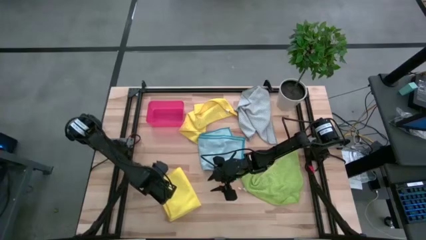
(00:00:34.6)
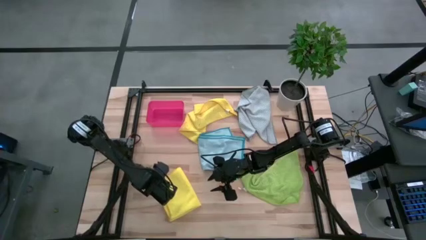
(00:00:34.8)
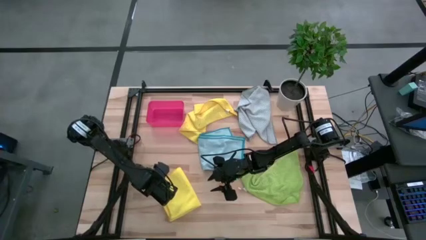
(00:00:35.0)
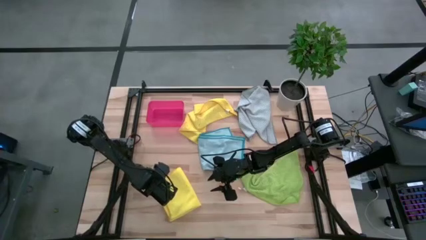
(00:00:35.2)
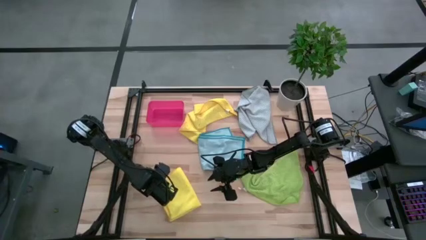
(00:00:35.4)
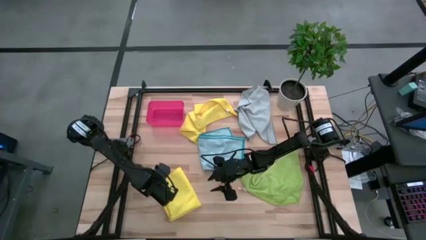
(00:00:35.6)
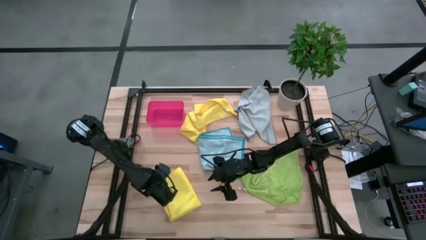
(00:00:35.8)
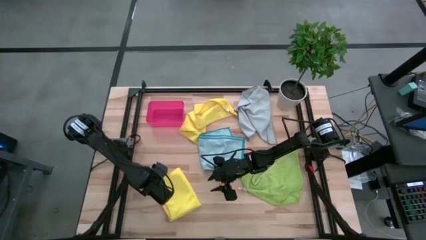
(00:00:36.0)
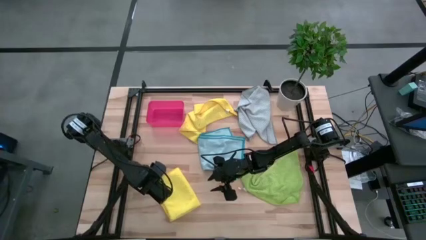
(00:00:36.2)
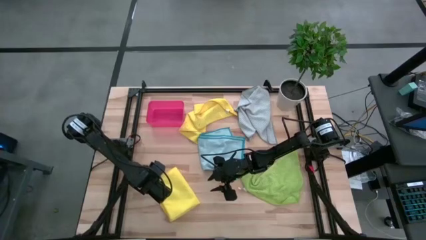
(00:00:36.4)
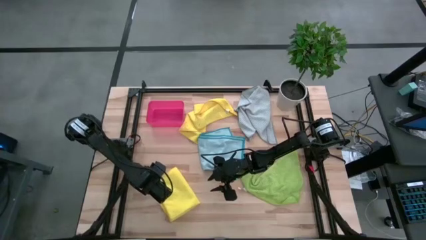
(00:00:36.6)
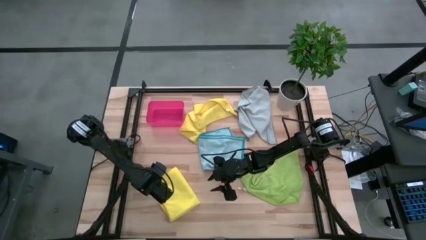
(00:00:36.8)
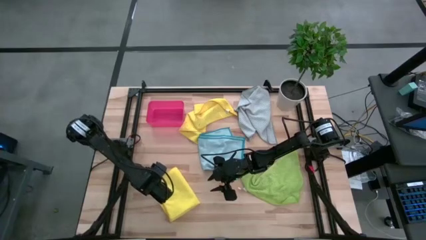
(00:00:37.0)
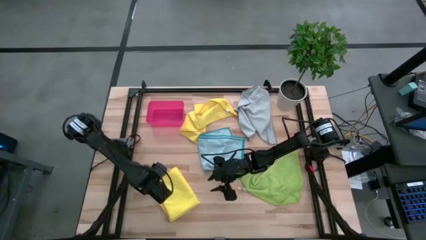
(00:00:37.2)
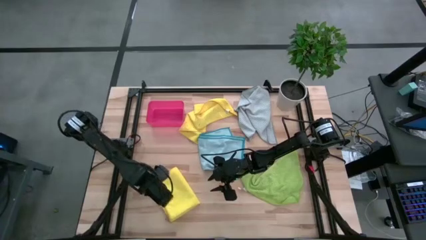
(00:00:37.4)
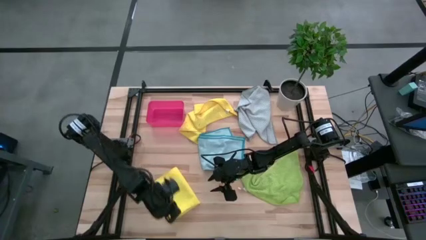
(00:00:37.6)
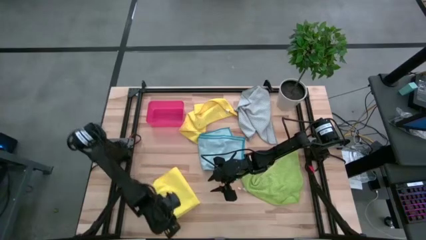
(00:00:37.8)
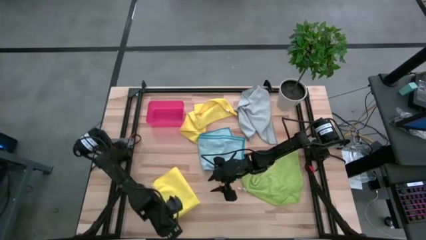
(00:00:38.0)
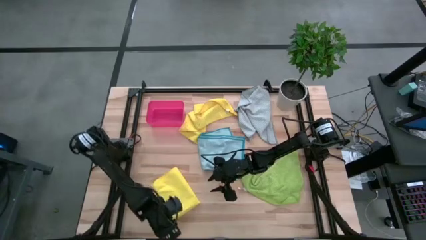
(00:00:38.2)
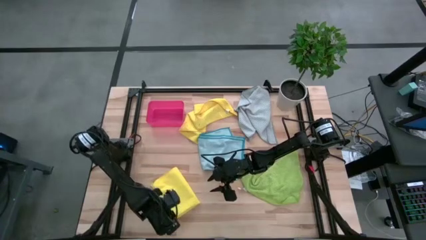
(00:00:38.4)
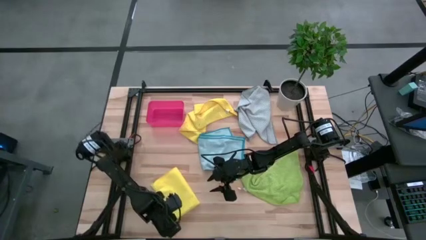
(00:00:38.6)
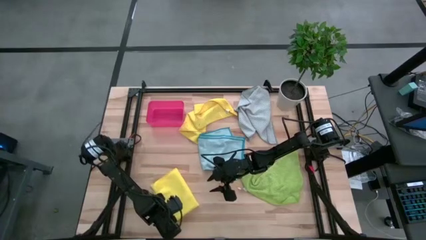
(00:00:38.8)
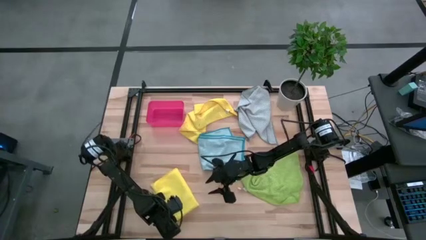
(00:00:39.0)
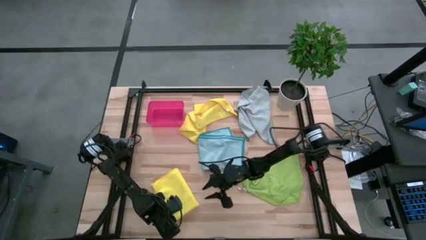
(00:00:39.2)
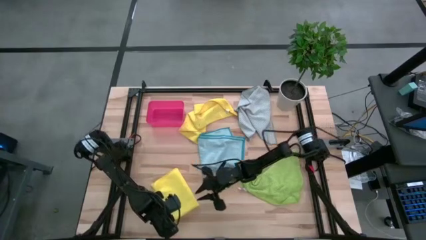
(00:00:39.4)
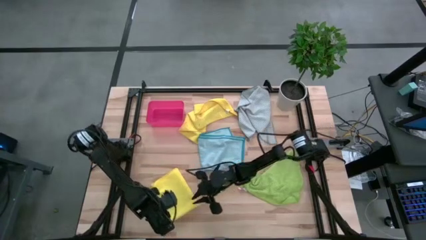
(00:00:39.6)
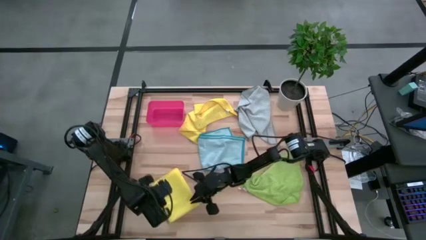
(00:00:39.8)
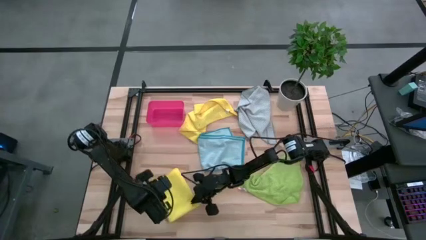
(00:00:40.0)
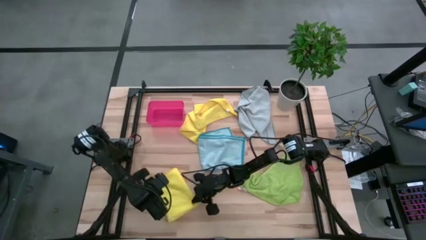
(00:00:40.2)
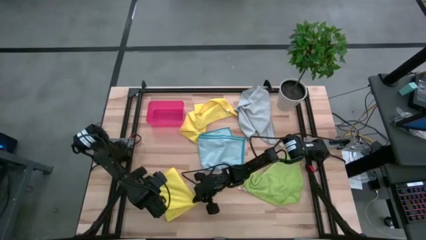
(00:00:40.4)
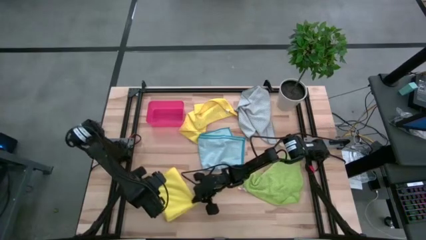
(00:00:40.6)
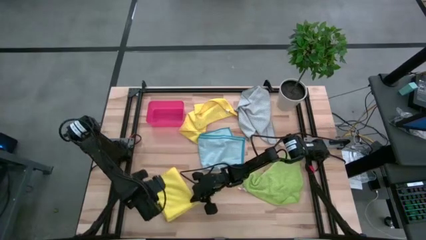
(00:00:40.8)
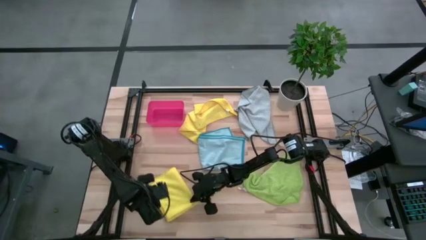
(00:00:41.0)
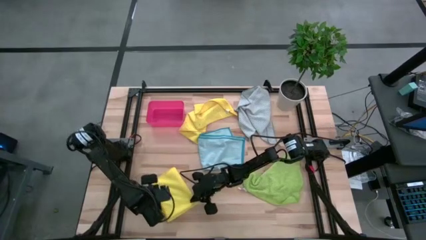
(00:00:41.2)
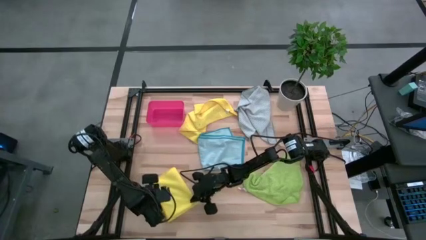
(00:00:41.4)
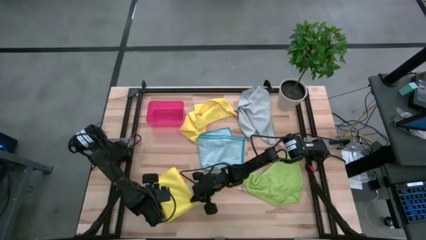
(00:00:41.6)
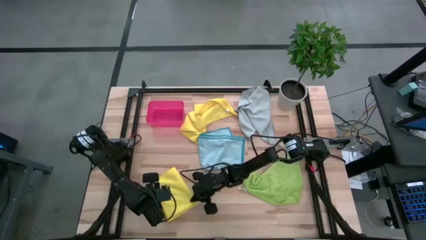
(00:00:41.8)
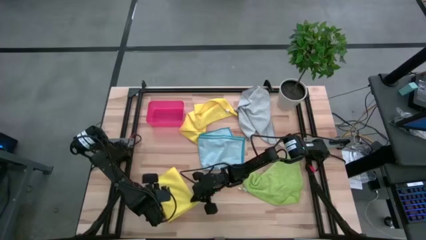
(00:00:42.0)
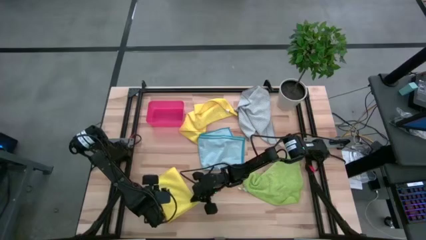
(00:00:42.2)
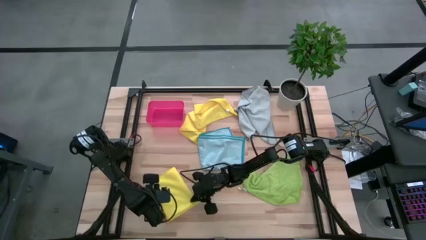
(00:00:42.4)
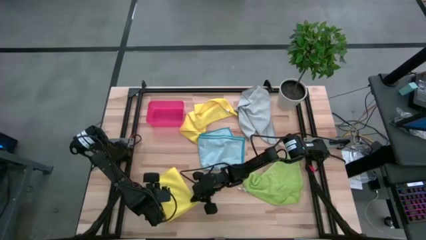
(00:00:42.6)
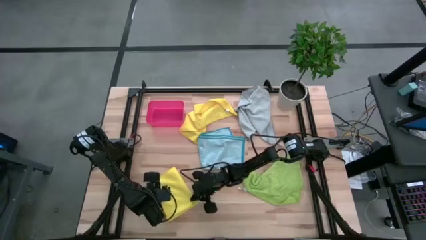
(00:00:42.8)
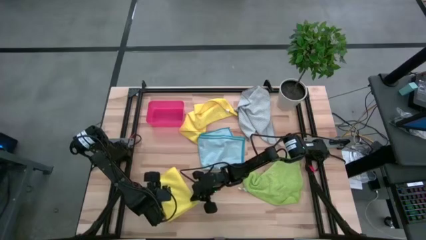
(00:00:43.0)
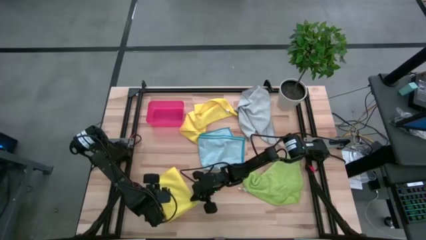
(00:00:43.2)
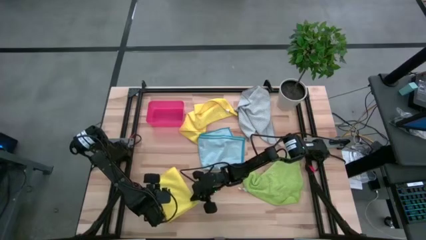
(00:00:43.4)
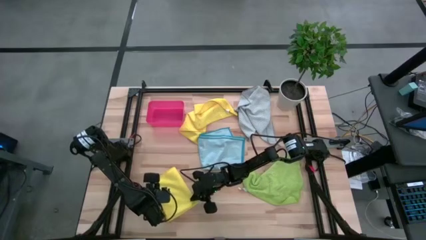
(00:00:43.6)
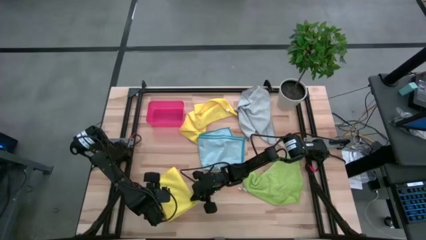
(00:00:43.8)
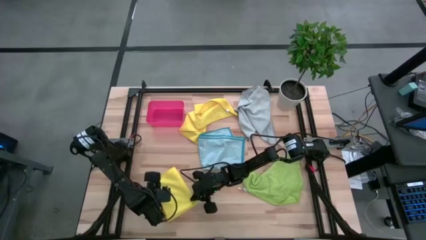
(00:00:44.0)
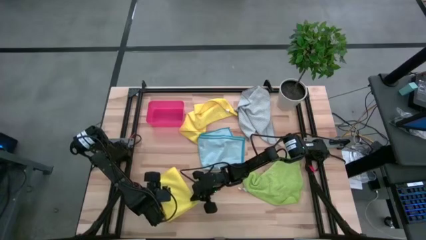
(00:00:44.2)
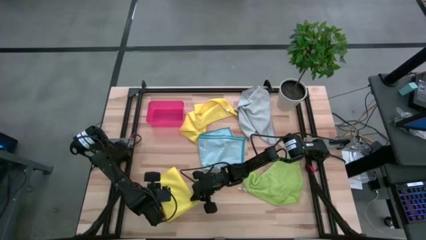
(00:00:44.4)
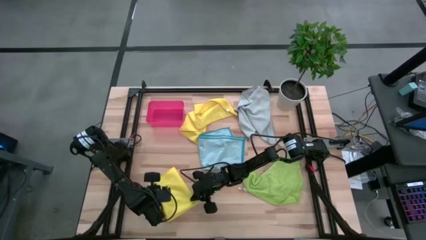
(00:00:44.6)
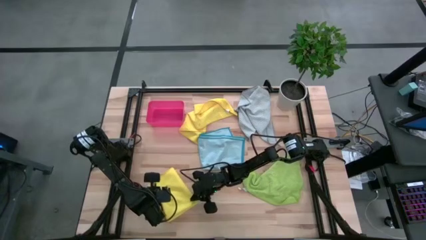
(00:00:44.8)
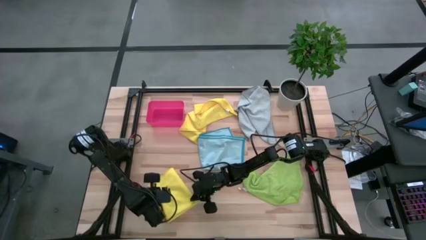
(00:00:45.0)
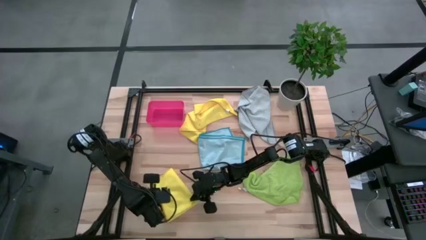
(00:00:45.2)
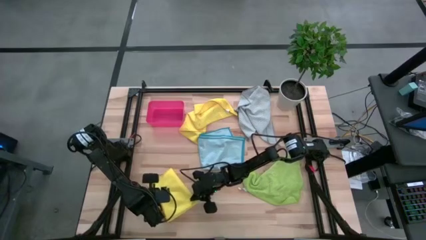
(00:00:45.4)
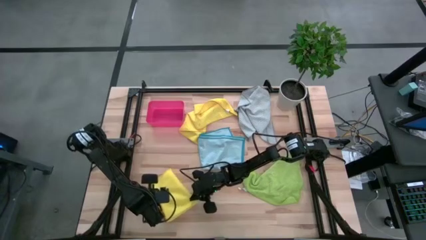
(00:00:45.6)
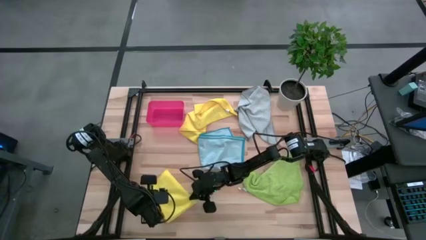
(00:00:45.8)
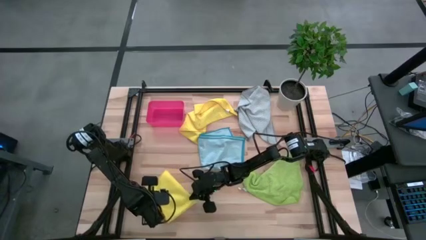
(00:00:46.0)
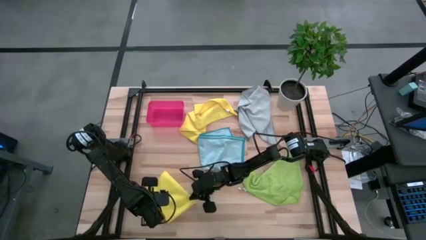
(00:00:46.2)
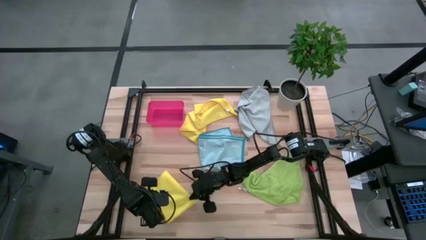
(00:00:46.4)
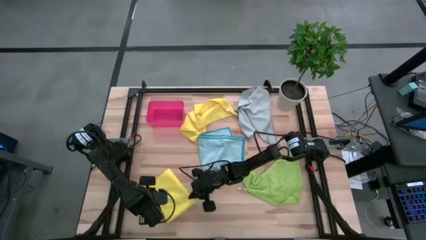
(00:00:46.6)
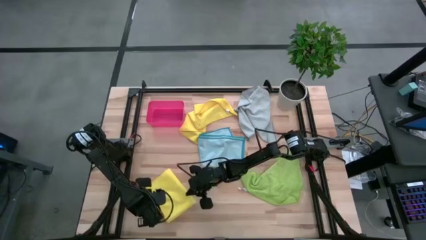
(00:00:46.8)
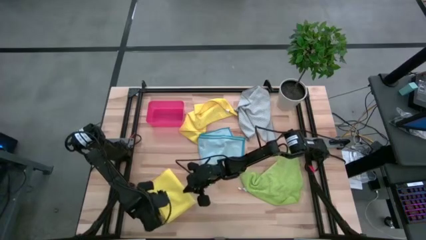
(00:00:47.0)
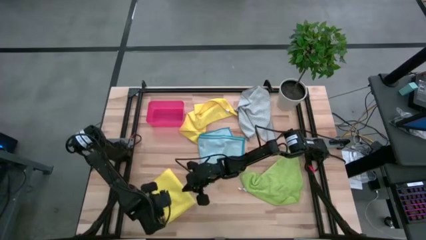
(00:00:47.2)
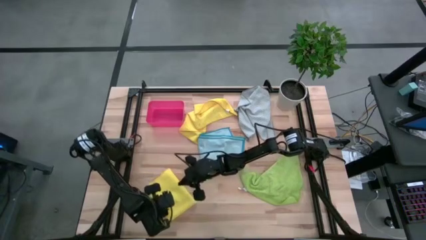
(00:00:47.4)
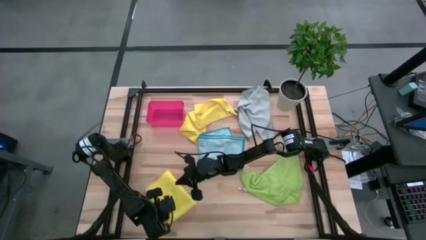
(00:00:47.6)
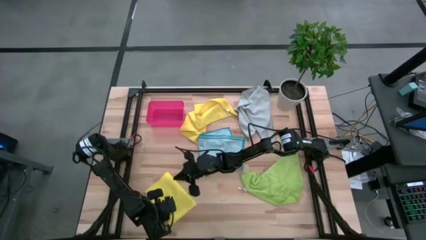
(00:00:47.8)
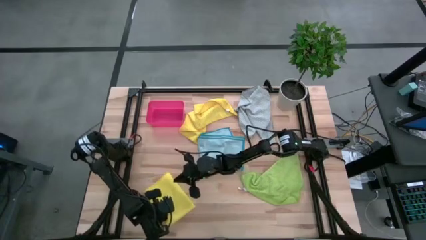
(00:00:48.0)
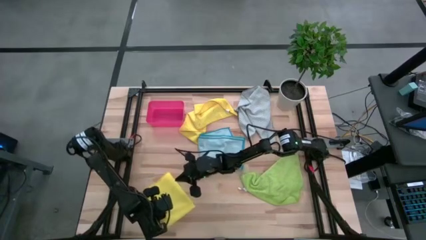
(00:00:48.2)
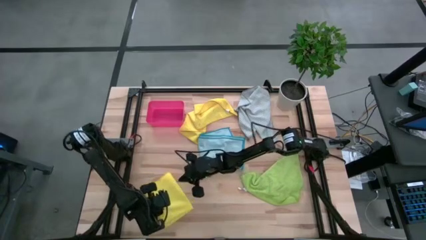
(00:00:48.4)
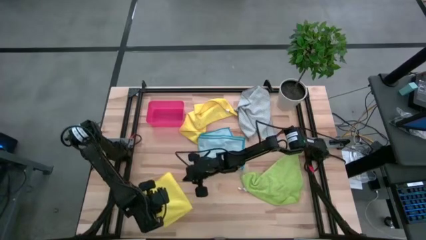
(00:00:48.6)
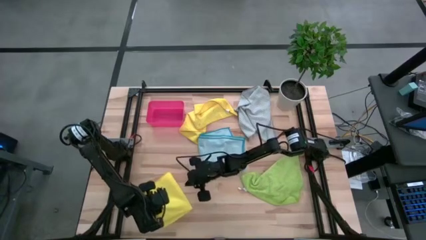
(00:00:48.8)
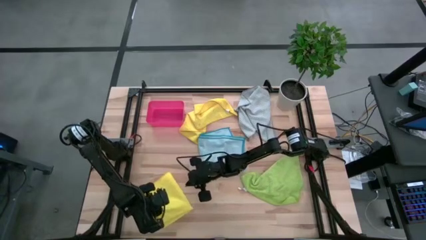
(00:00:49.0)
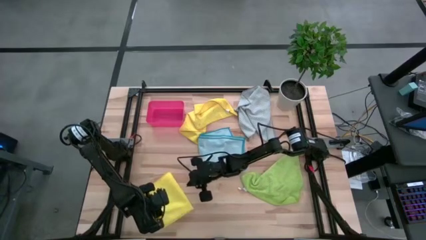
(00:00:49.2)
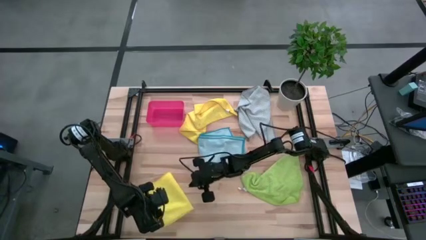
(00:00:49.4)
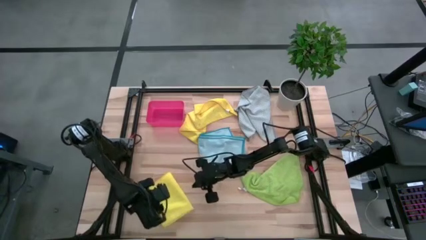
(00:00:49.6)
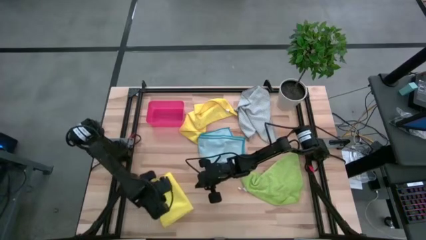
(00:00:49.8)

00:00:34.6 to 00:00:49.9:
Task: Fold microfiber towels
Fold the bottom yellow microfiber cloth
